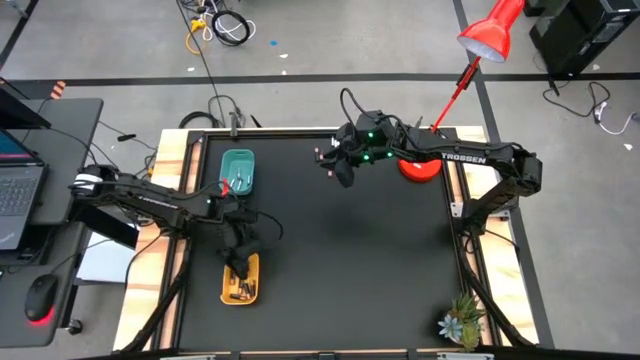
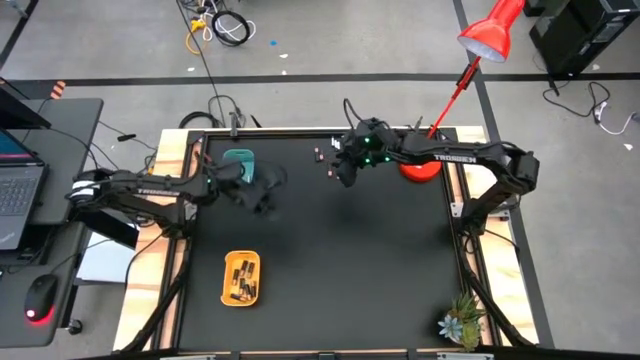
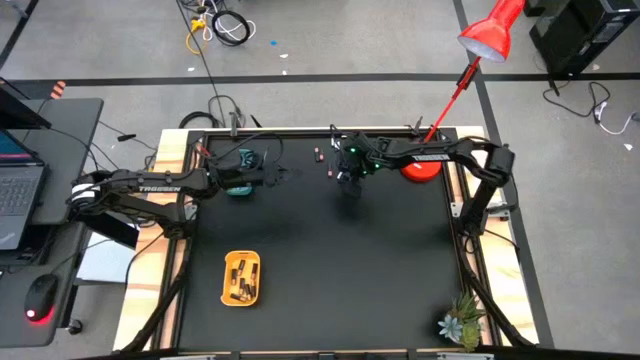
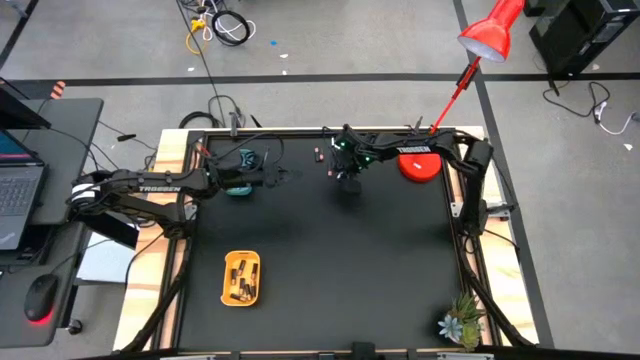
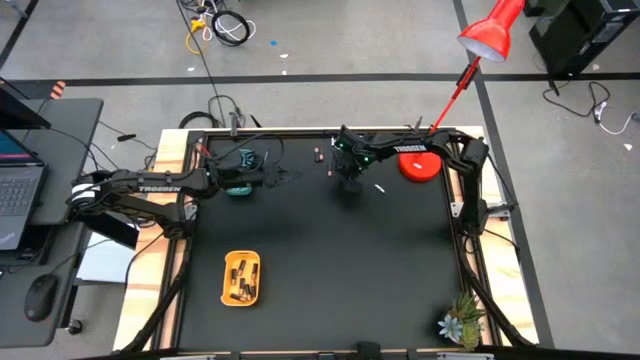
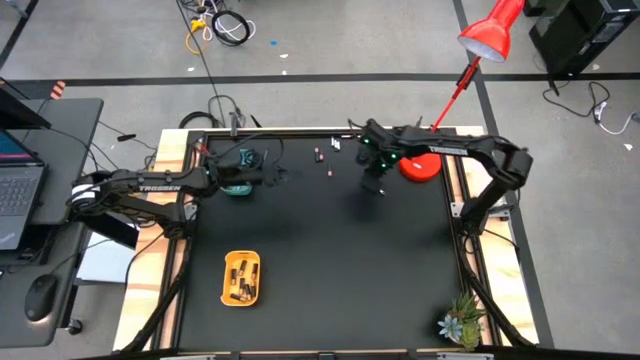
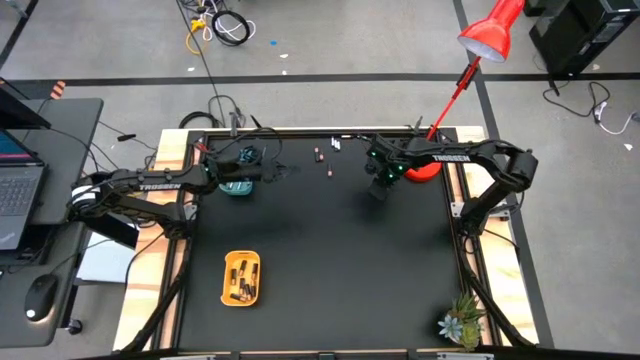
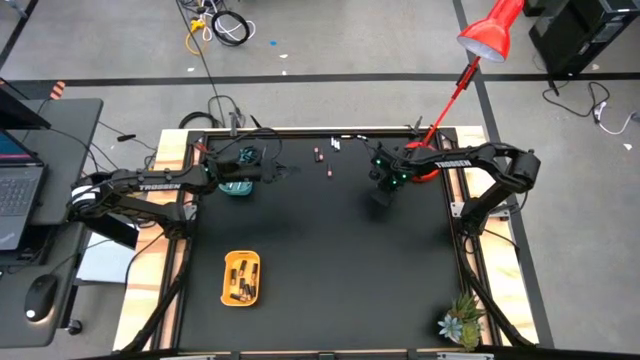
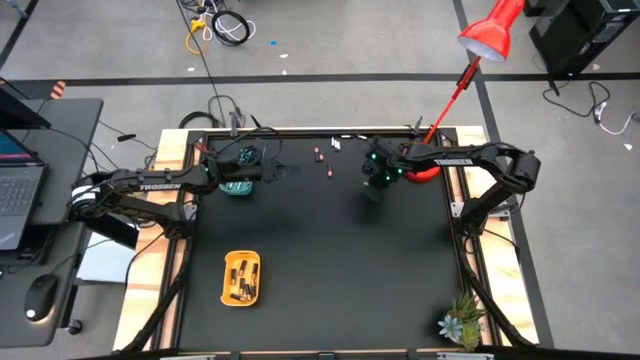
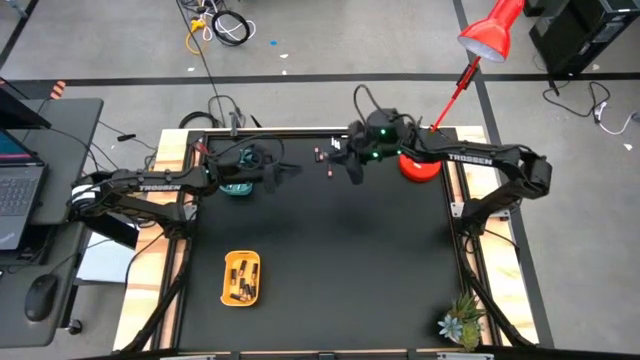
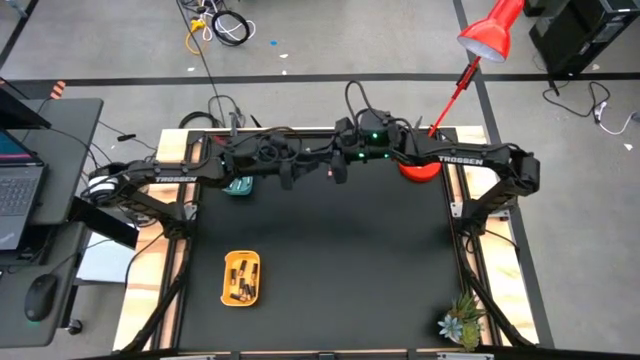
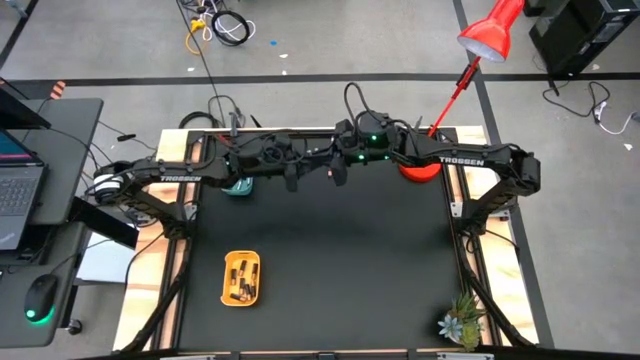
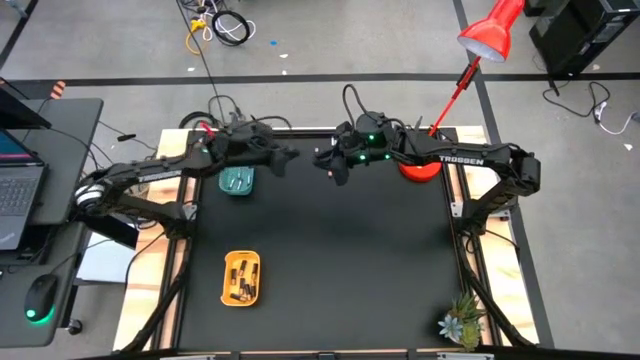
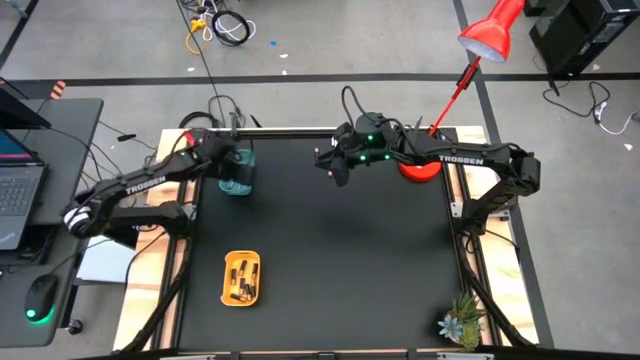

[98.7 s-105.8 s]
Task: Sort batteries
Put the white battery into the blue bin

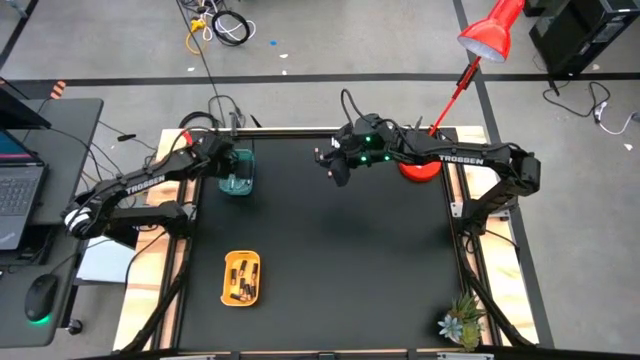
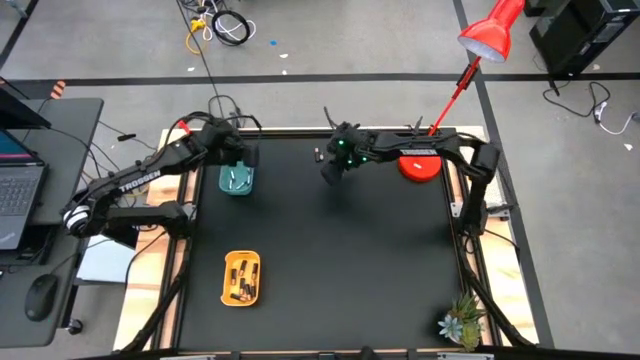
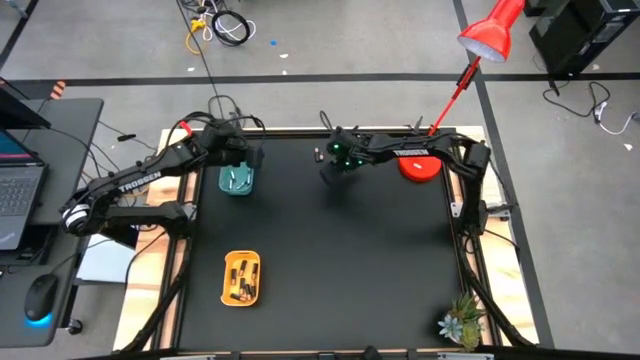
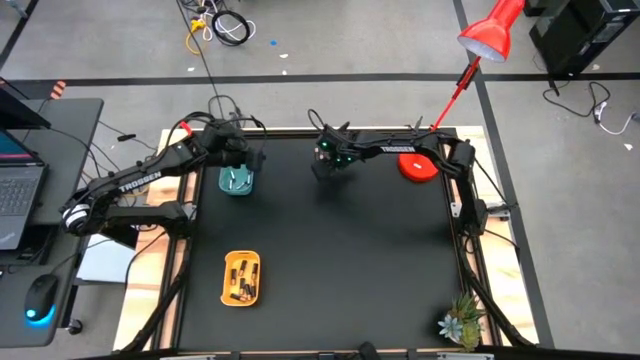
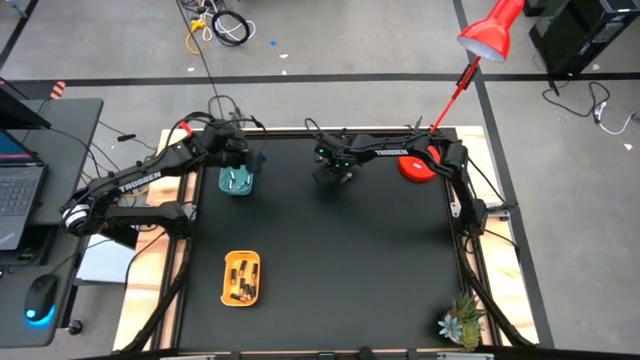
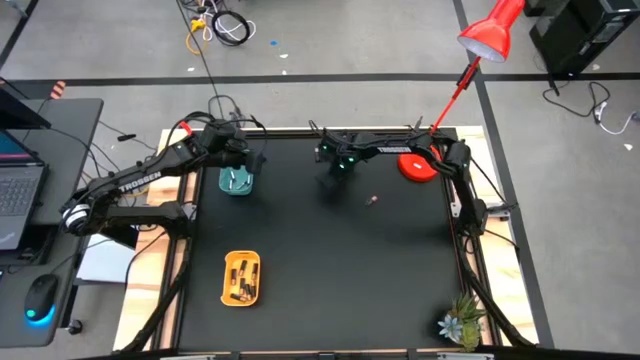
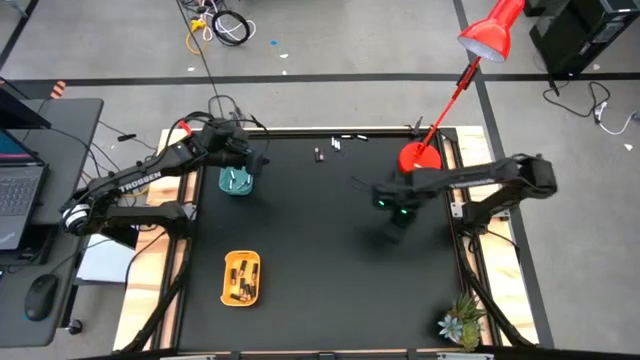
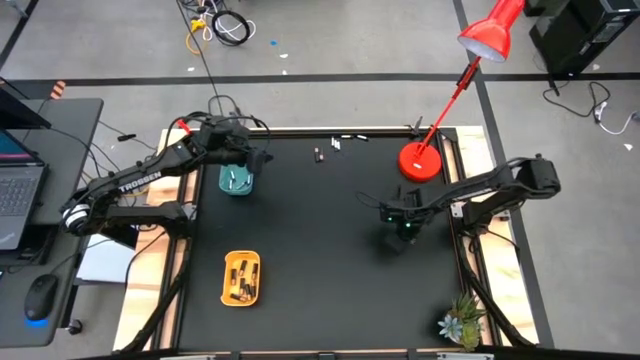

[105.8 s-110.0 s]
Put the black battery into the yellow bin

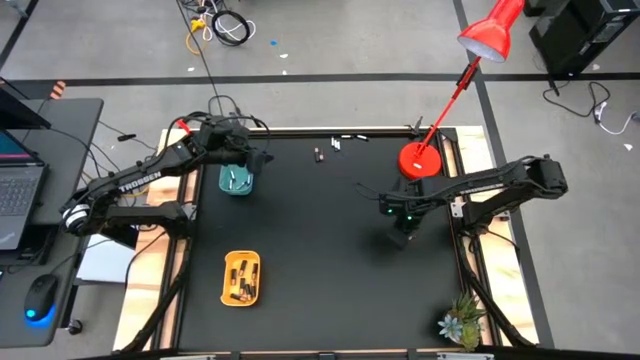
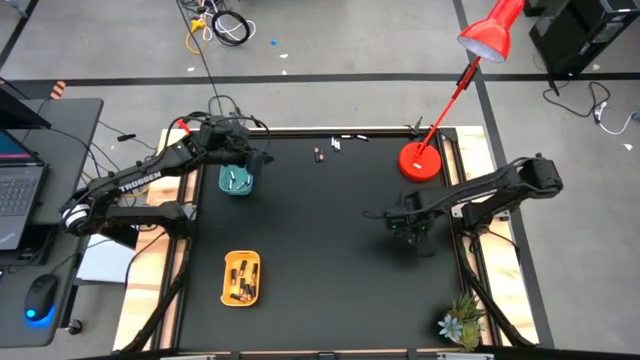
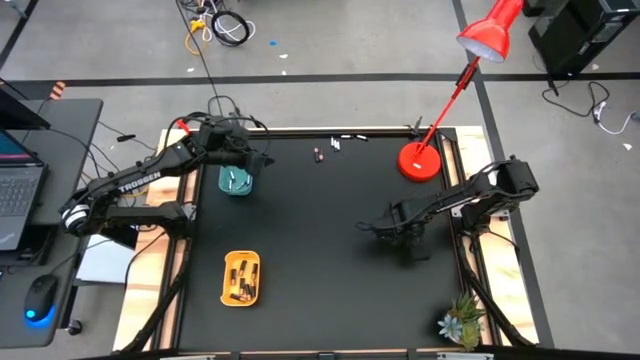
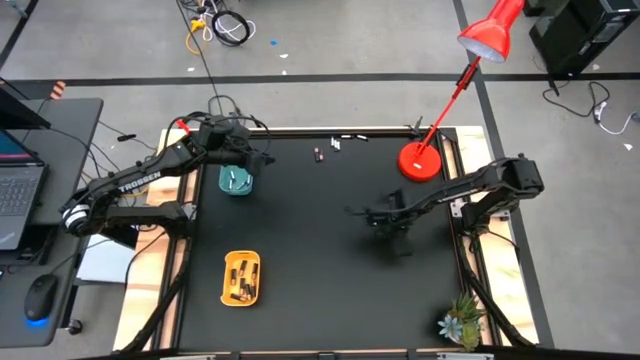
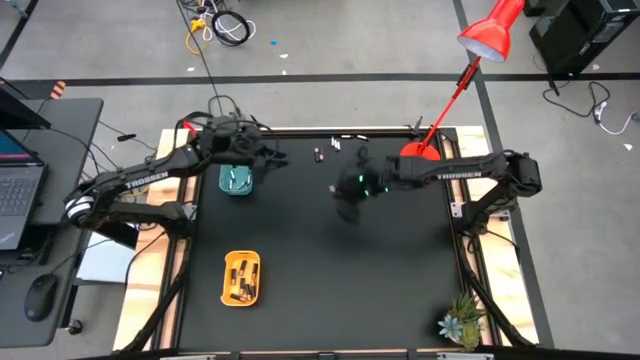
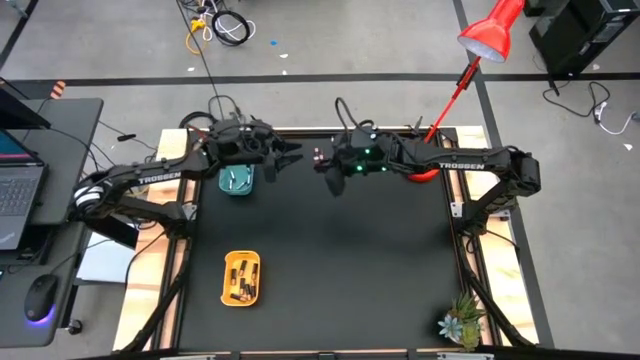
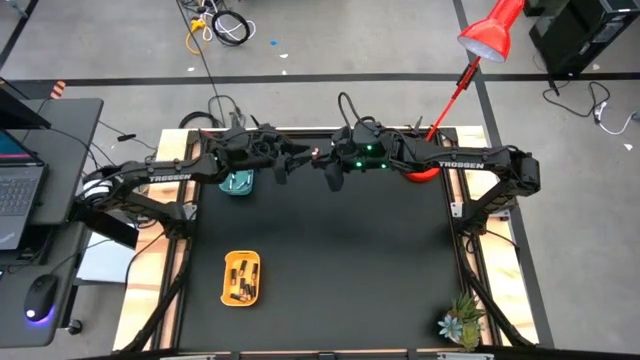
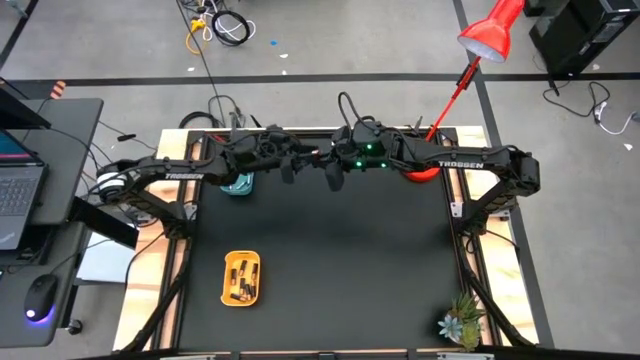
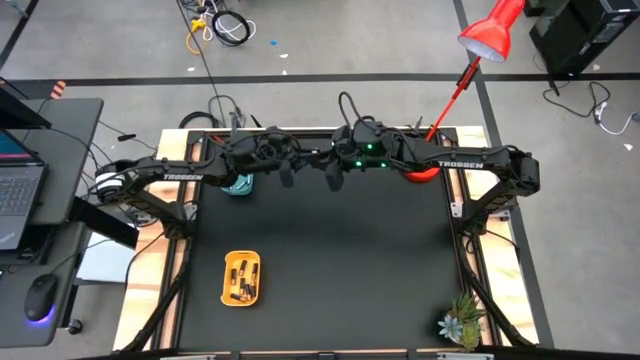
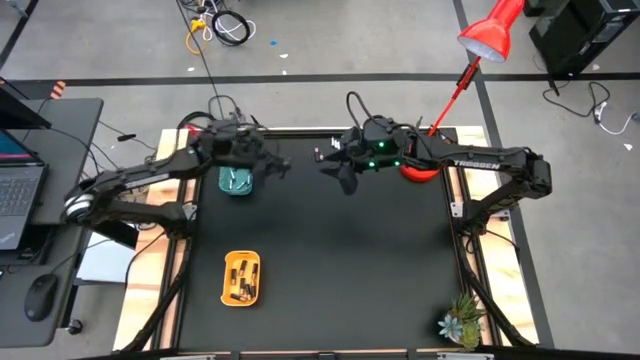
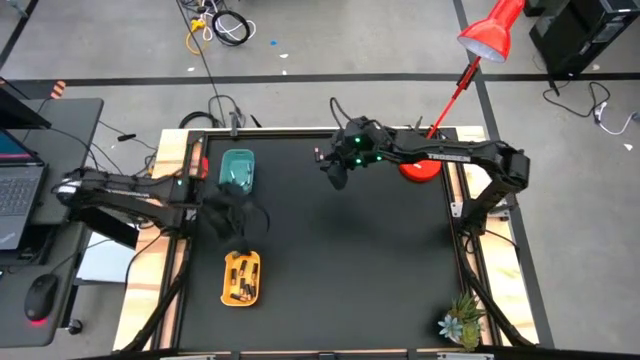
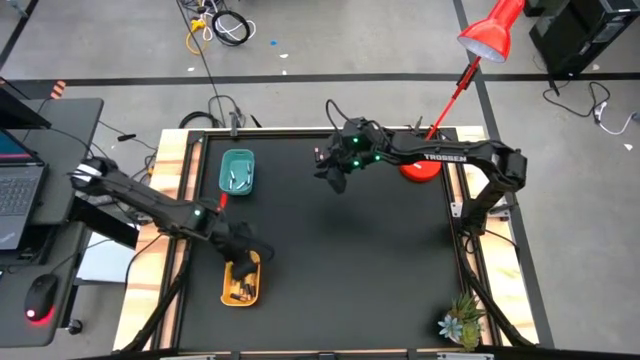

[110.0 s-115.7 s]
Put the black battery into the yellow bin

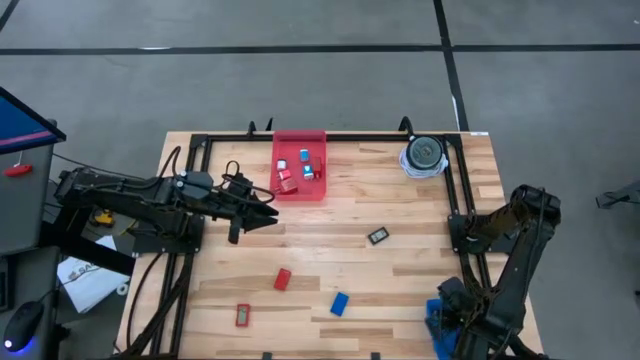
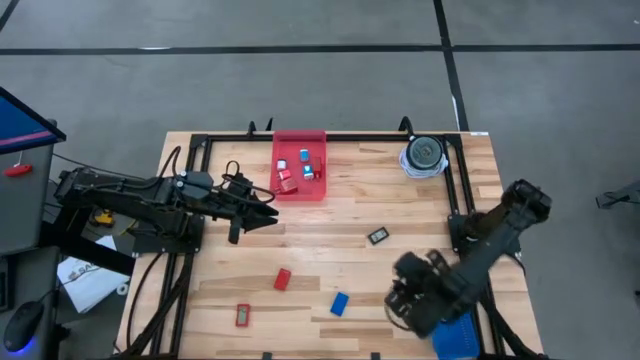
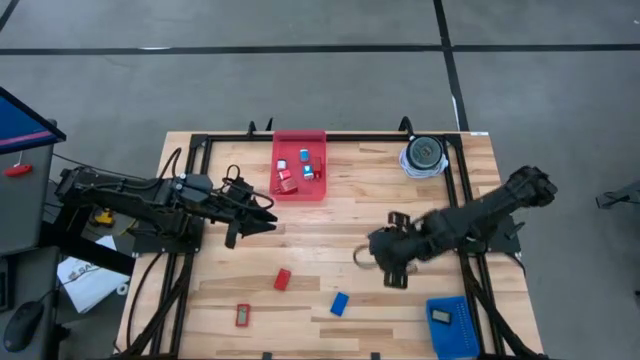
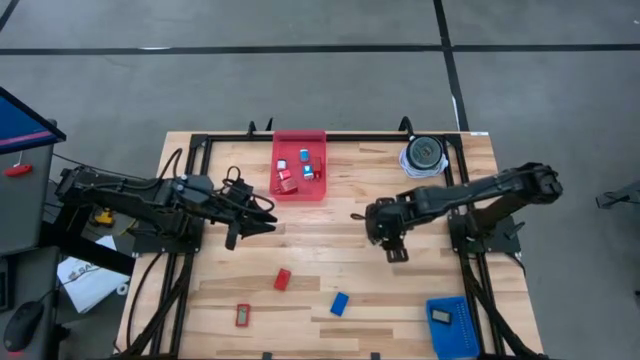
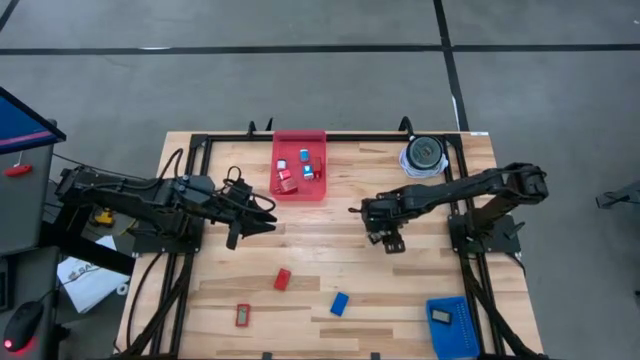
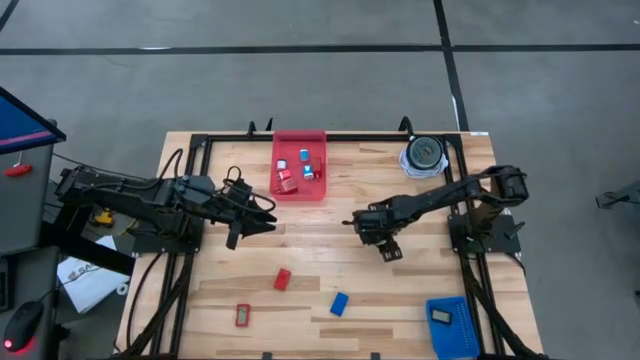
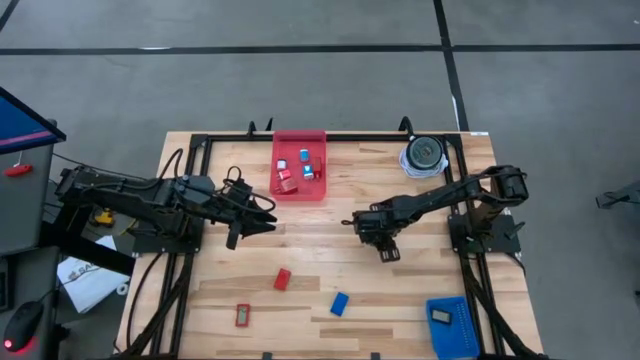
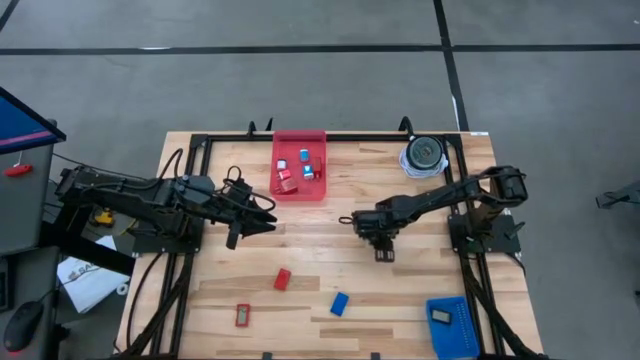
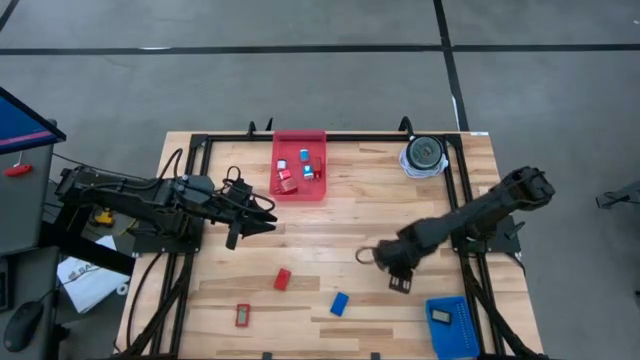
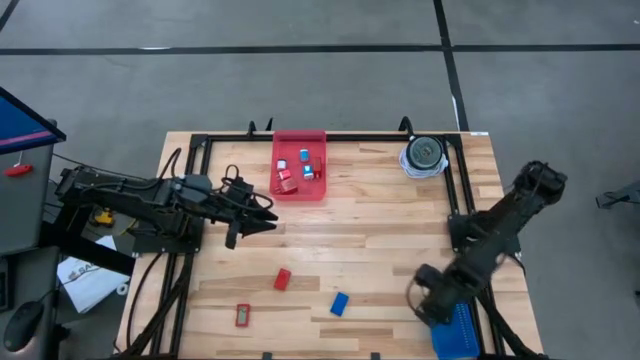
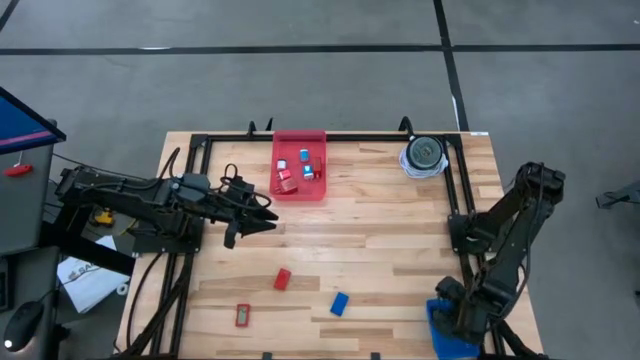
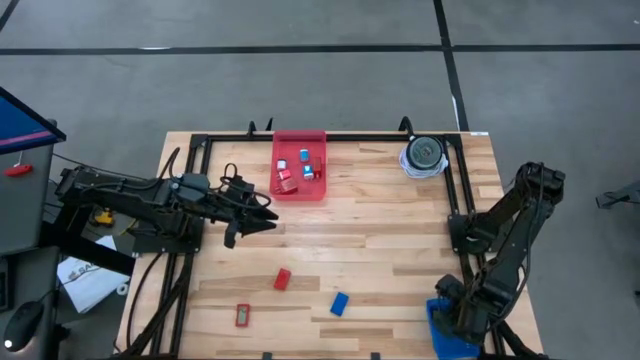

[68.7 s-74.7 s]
Task: Pick & Place Office items
Put the black digital timer into the blue bin
